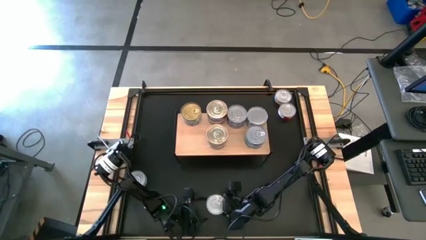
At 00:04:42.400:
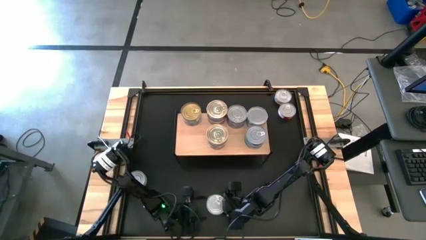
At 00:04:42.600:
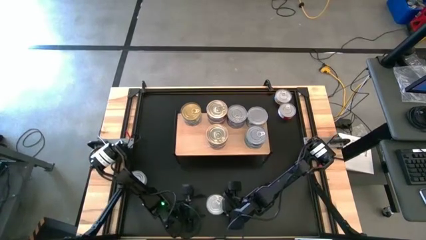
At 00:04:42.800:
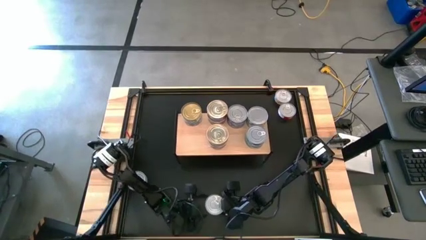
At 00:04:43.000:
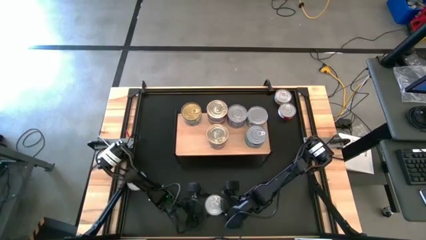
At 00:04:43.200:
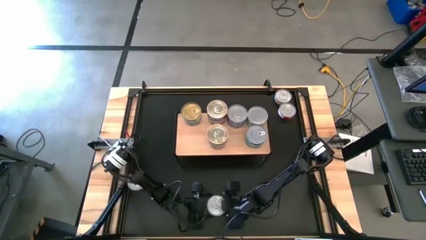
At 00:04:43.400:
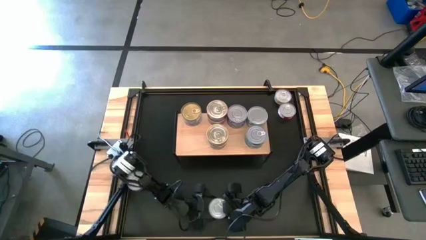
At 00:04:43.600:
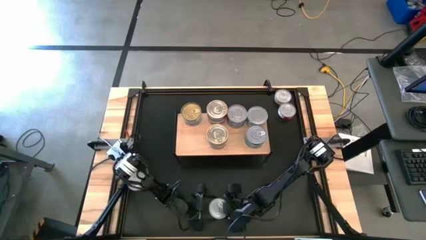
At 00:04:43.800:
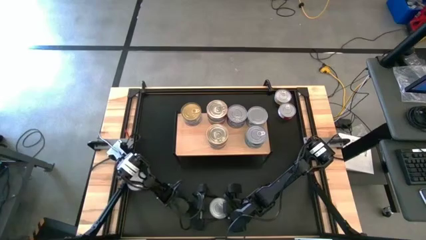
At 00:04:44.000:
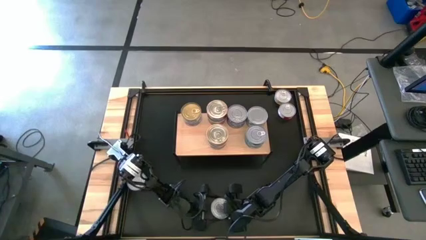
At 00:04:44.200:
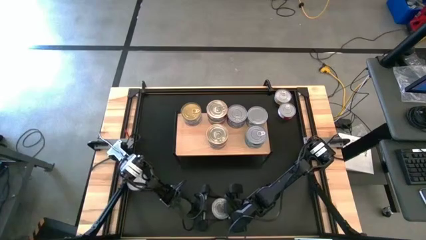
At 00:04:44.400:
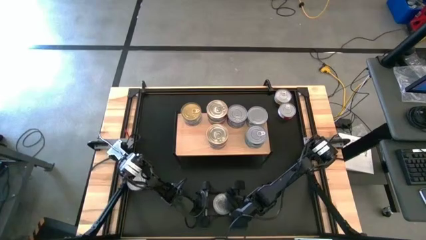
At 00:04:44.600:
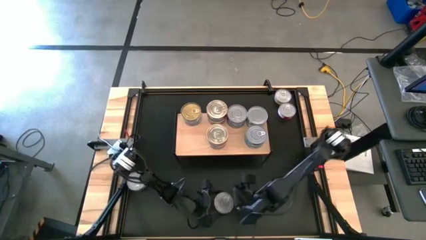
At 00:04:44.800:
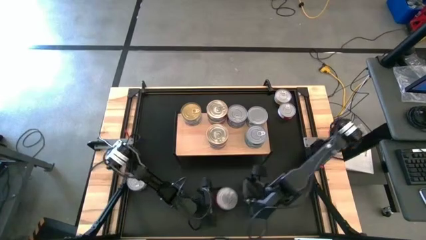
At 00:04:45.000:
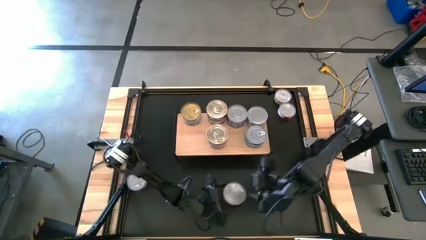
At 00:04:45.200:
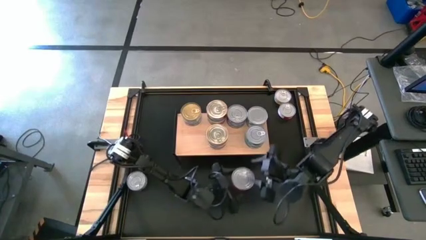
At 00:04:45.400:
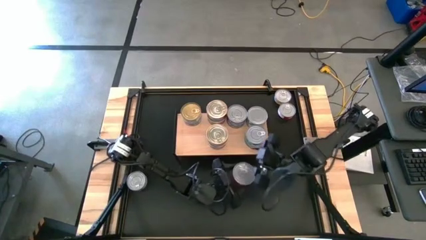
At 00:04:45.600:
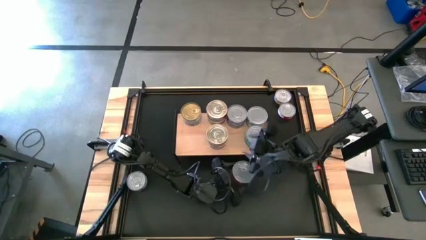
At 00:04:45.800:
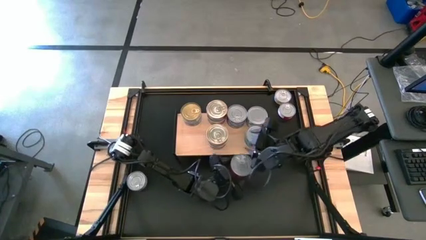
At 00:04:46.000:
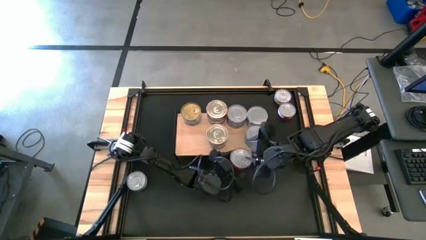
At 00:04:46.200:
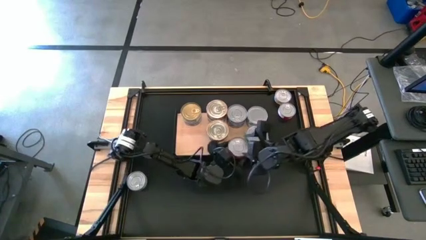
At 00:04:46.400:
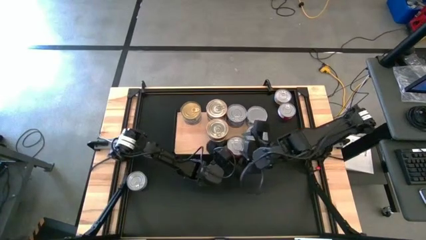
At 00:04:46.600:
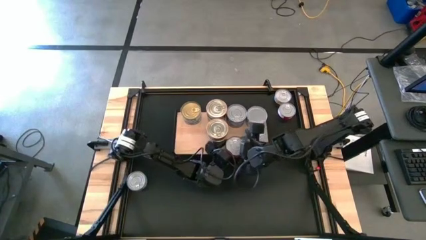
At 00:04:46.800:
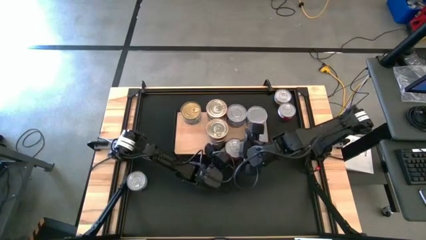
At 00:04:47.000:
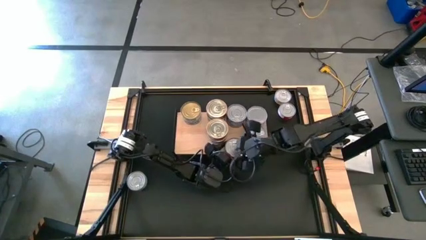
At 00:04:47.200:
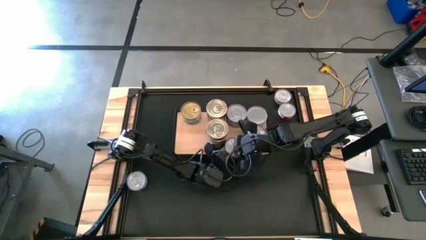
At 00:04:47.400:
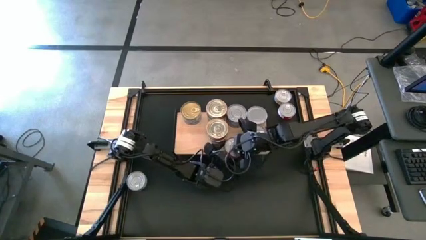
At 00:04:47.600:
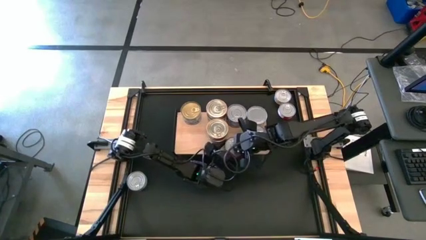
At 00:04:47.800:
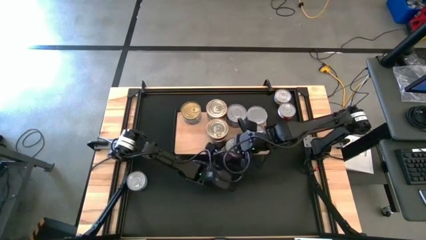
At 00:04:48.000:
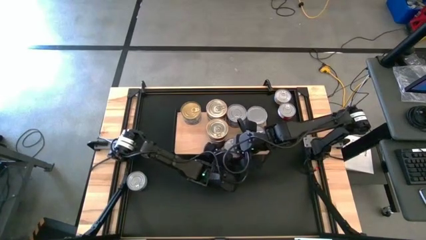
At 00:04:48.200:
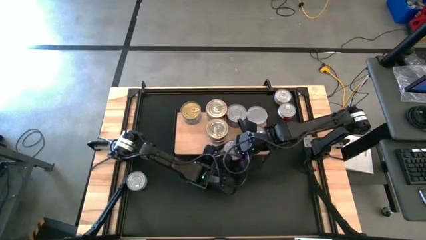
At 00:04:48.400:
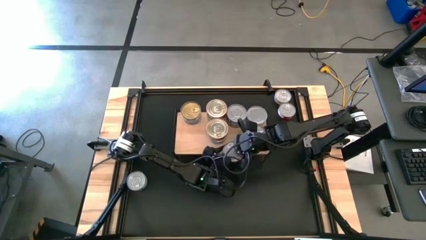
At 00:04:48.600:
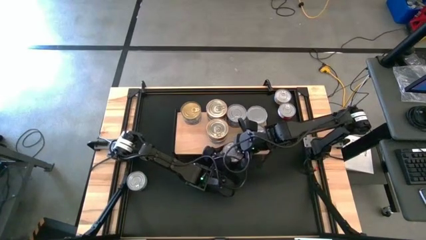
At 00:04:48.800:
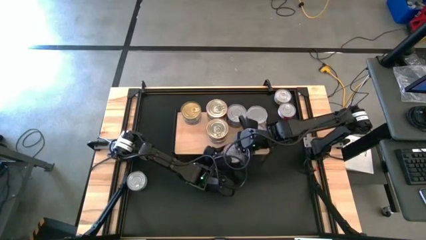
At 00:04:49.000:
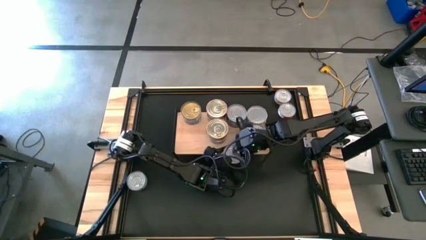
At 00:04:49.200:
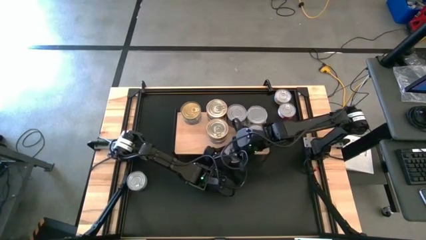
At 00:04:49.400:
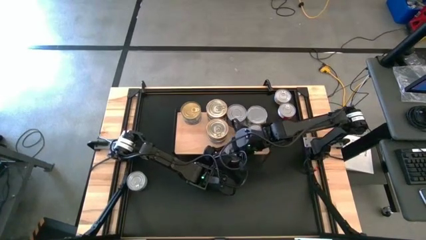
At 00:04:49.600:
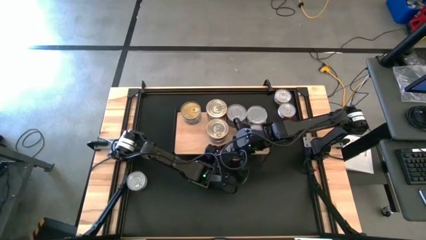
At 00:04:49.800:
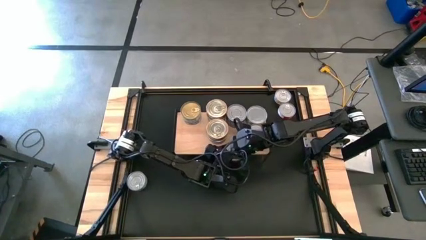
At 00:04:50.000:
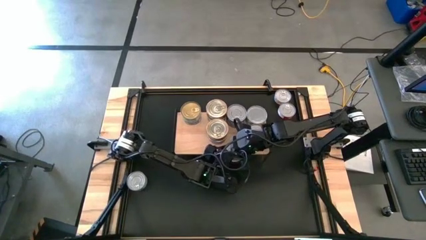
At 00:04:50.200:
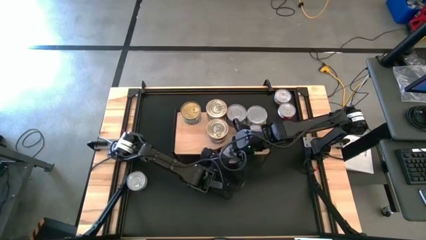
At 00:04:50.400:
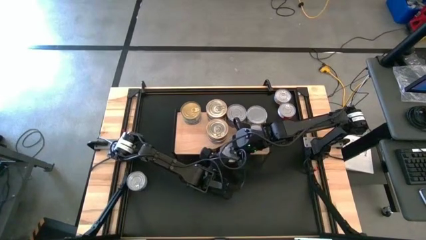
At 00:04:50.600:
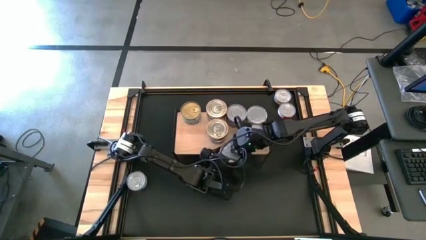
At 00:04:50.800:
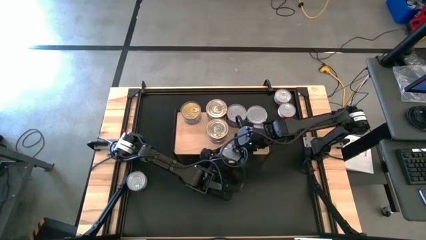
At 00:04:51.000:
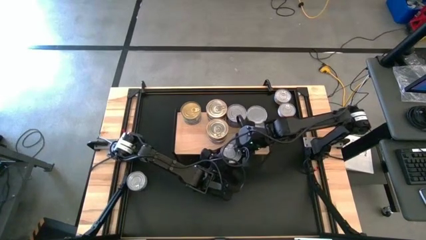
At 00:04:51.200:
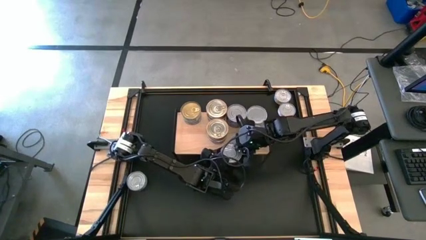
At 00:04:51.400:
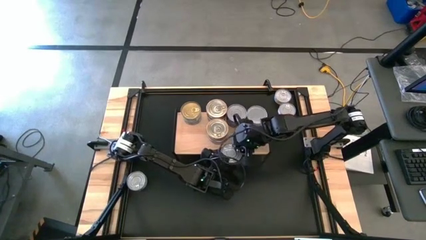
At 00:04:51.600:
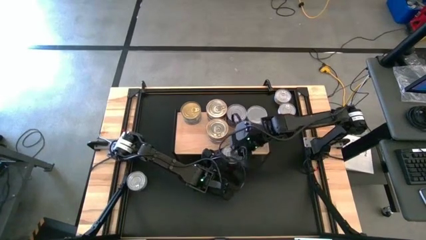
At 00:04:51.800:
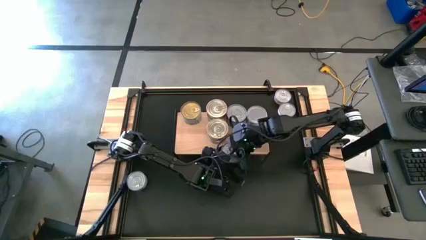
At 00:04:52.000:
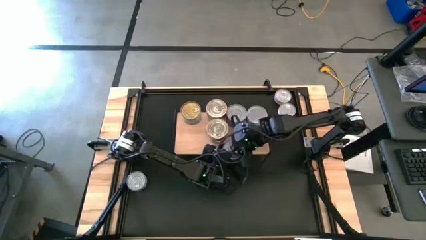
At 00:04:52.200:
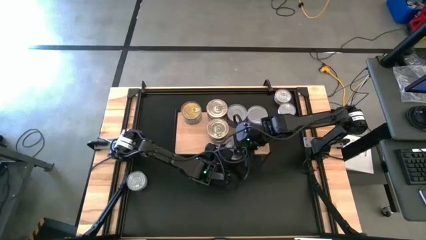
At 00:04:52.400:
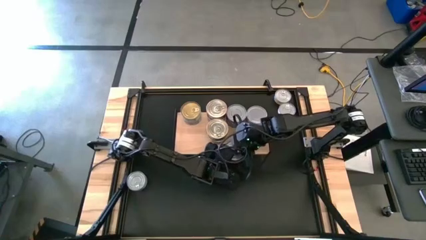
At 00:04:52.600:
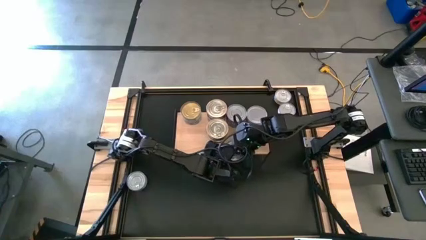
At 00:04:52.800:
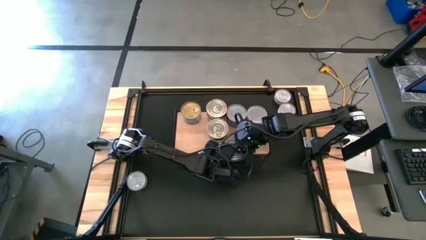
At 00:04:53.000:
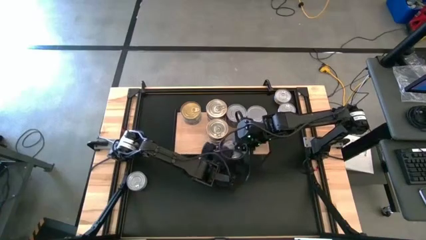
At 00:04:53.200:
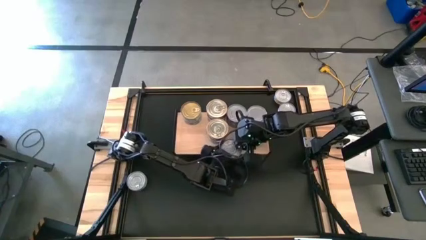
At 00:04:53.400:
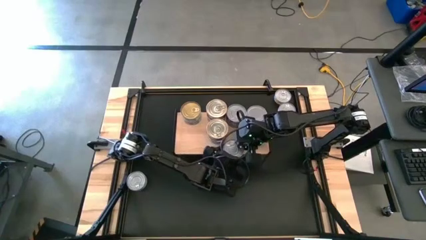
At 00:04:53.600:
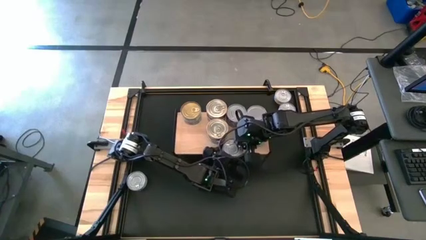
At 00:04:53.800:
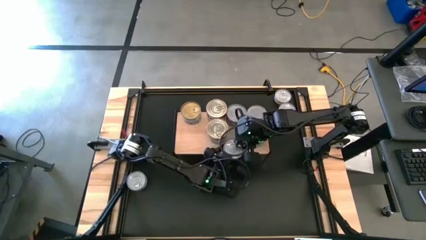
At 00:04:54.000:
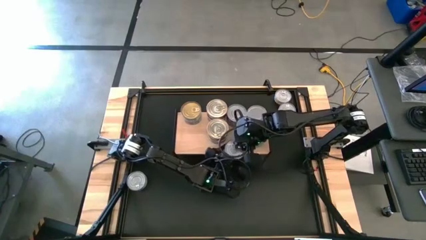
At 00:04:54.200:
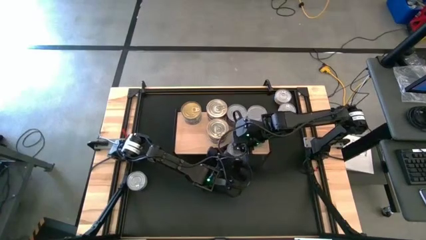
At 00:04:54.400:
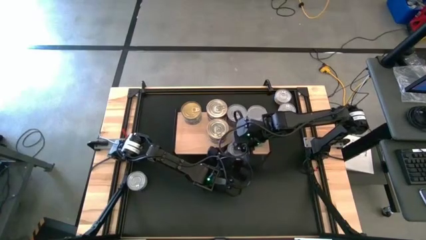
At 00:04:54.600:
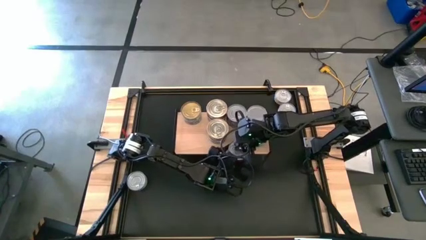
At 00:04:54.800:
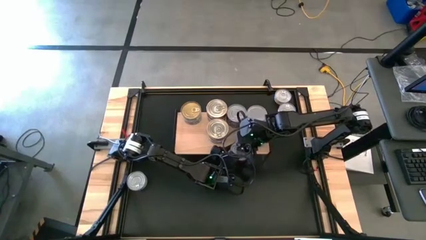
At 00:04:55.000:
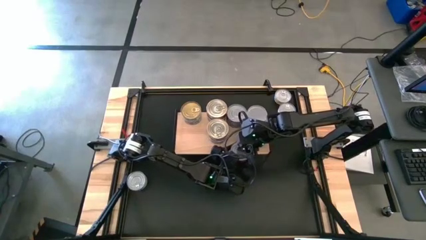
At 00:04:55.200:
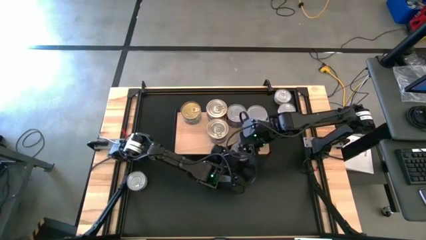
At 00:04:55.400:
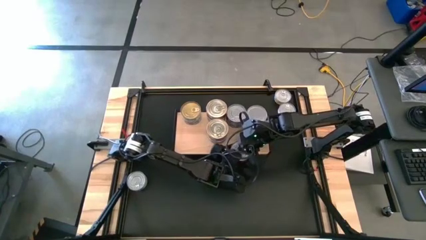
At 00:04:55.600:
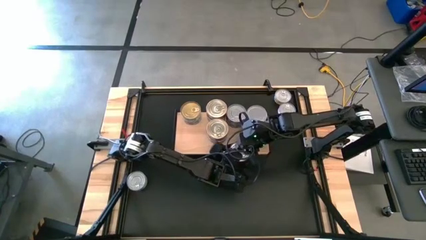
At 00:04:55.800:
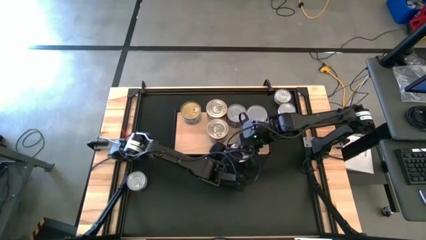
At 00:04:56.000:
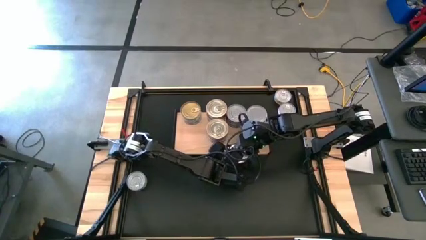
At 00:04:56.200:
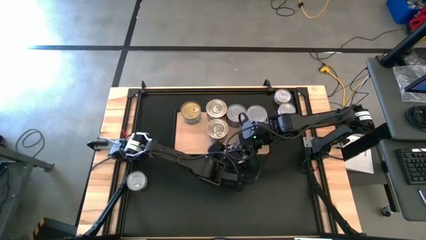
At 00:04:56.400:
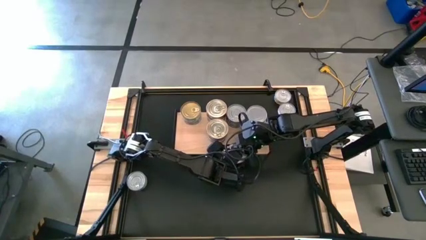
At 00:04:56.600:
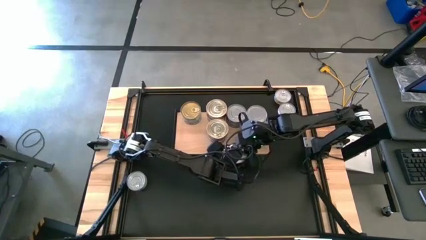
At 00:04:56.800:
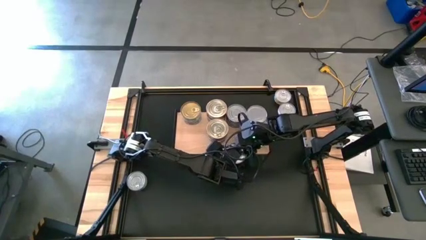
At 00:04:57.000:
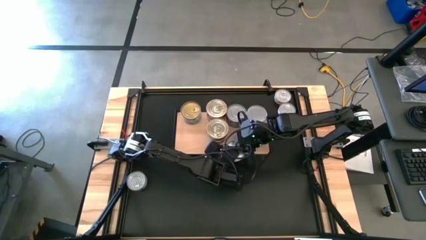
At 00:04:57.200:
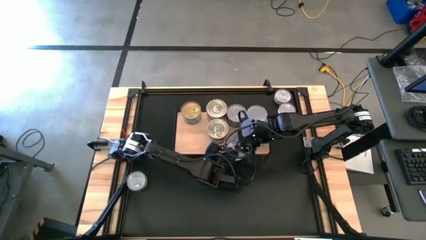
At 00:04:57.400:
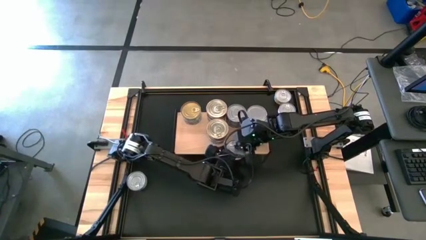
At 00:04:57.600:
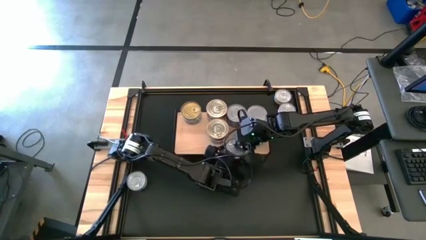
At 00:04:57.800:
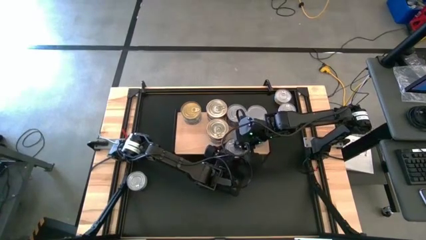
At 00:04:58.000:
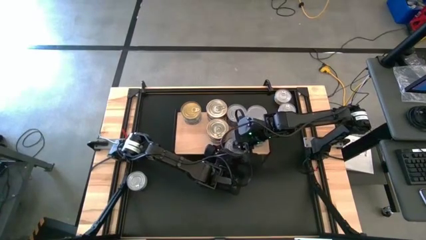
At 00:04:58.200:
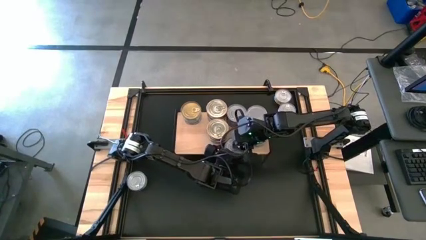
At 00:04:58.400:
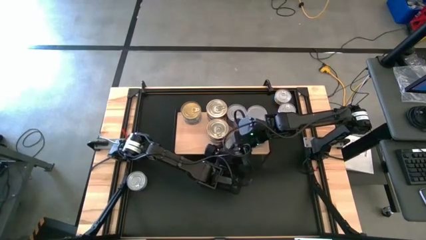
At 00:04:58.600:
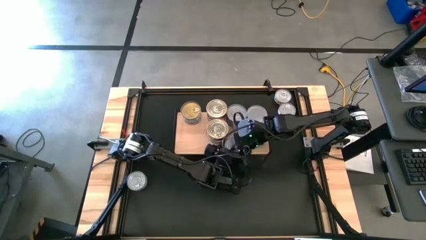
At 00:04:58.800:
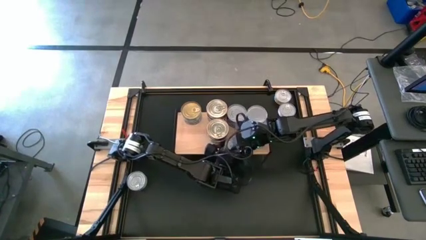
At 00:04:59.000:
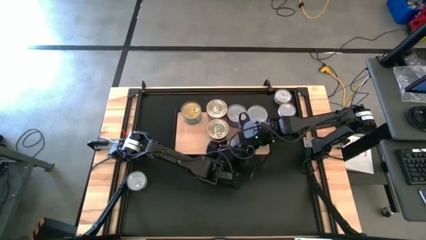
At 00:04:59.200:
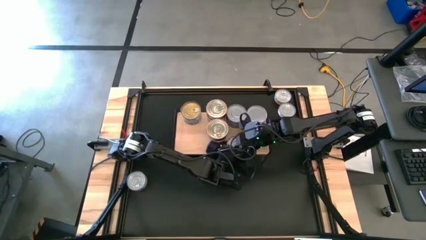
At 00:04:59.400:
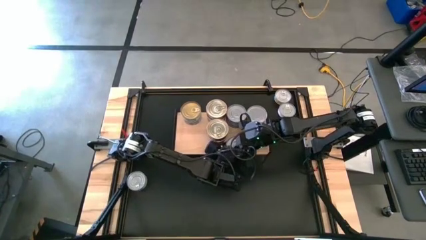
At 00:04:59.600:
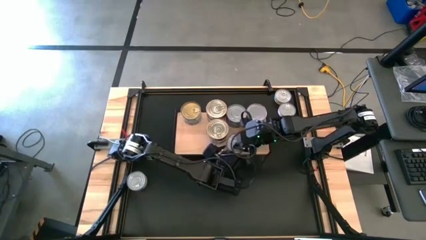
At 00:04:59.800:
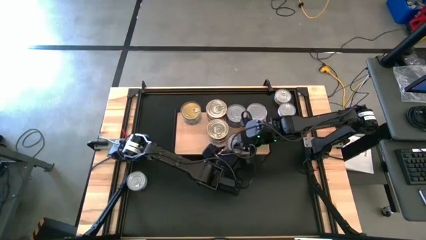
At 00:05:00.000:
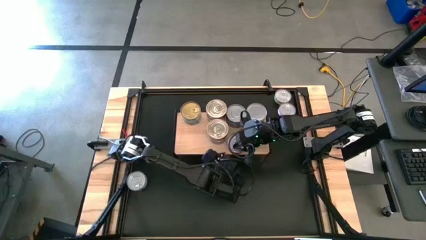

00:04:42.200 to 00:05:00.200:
Task: Stack canned seafood by type on shelf
Put the red tuna can on the shelf
